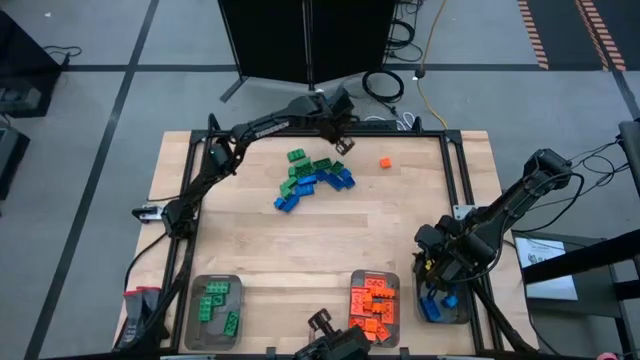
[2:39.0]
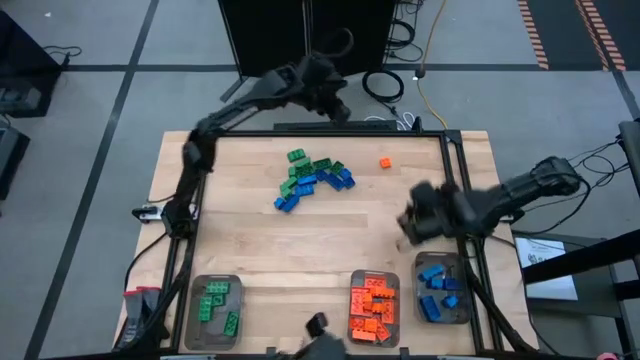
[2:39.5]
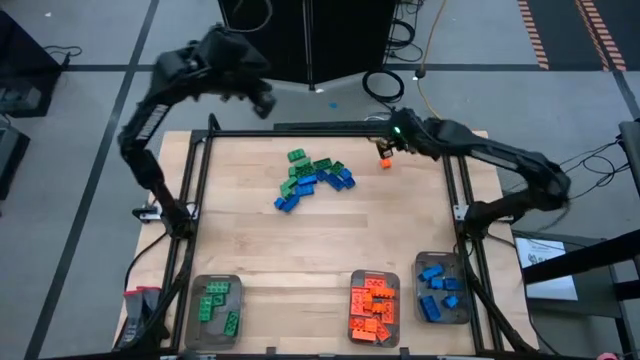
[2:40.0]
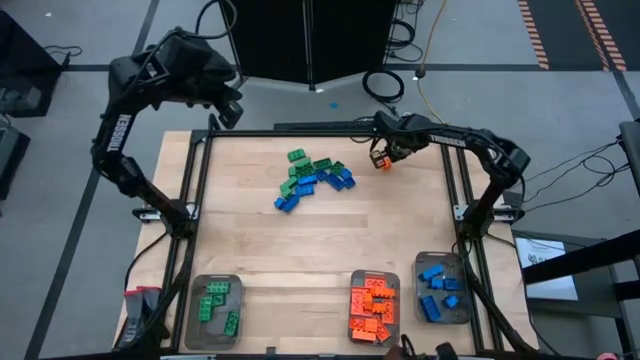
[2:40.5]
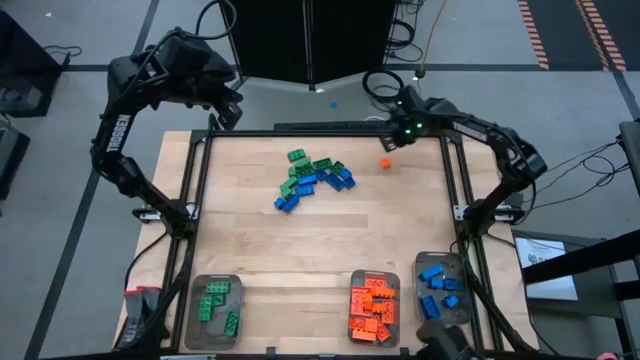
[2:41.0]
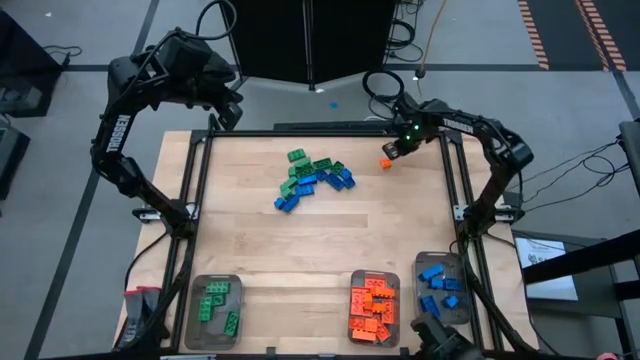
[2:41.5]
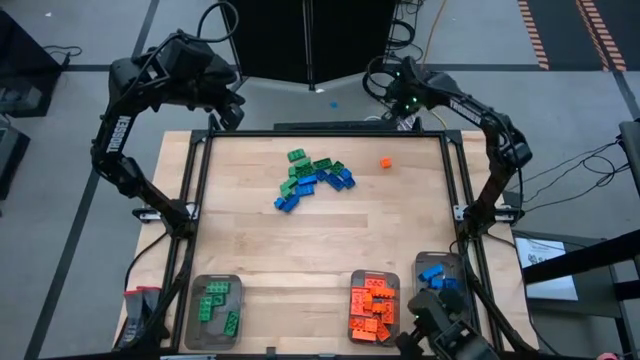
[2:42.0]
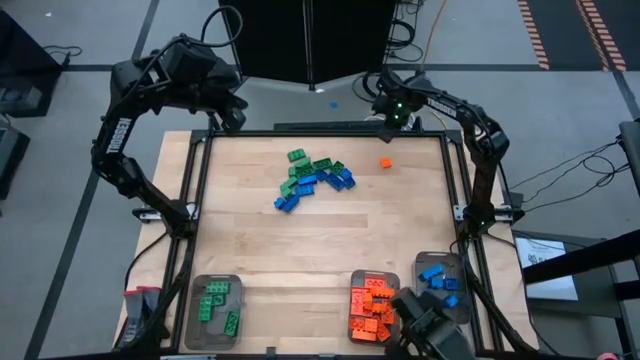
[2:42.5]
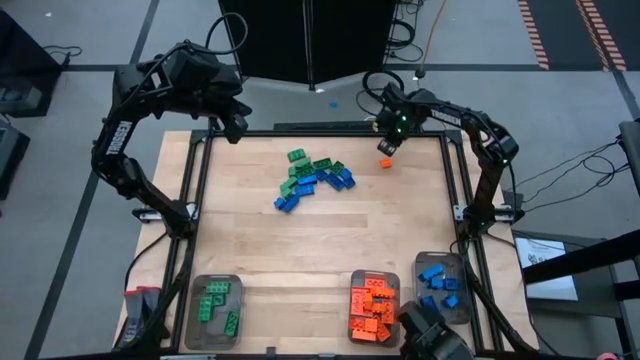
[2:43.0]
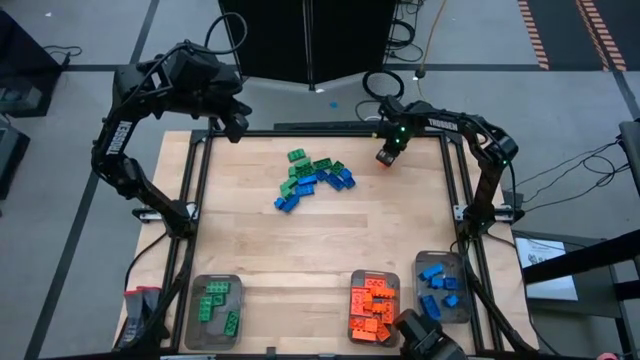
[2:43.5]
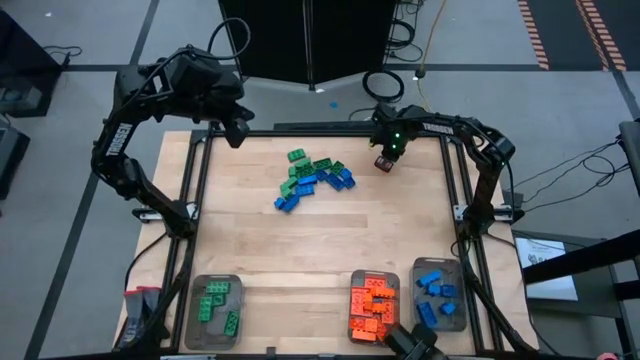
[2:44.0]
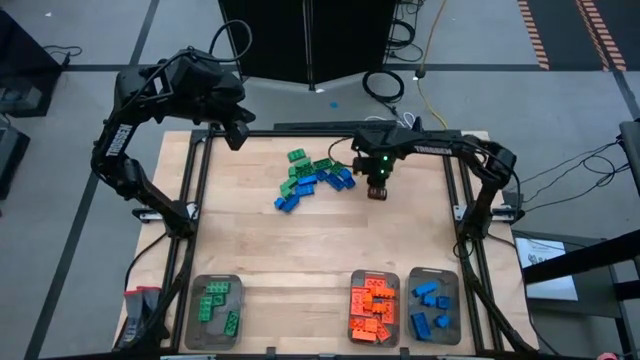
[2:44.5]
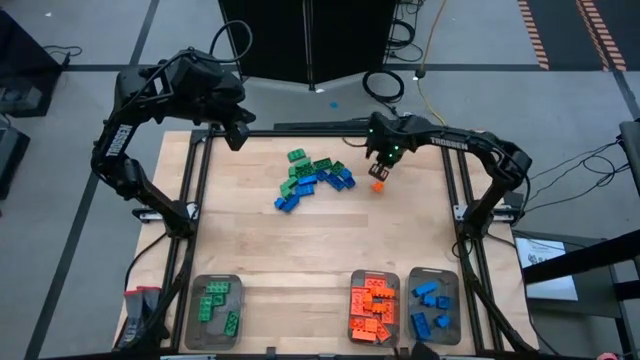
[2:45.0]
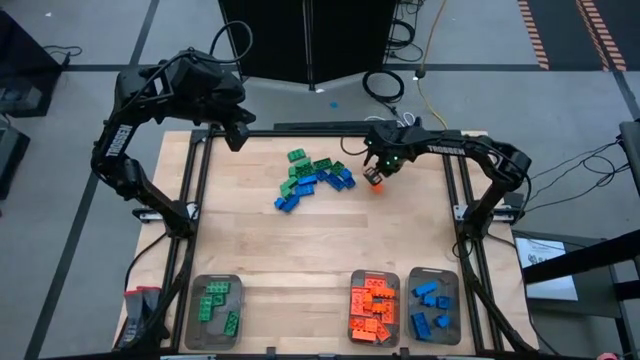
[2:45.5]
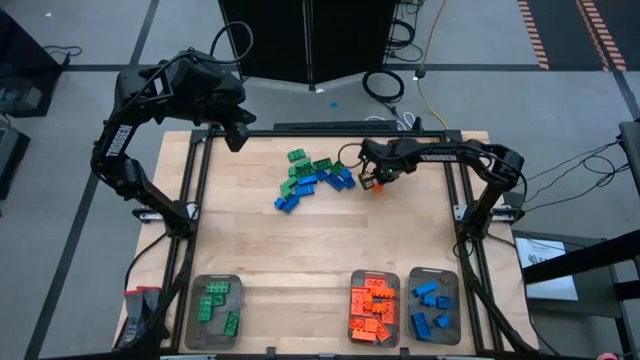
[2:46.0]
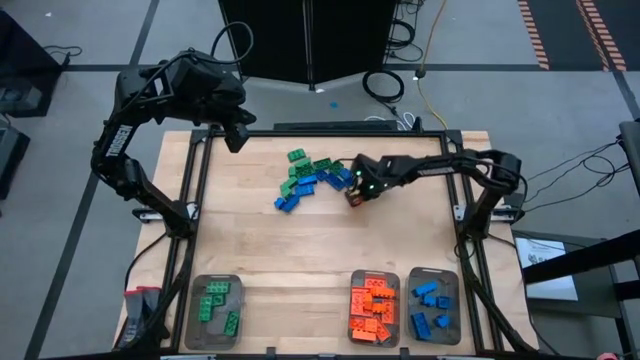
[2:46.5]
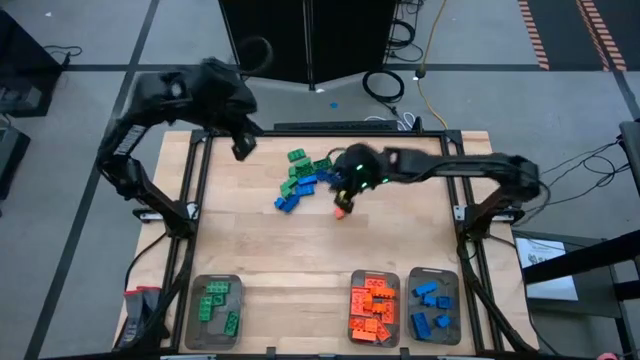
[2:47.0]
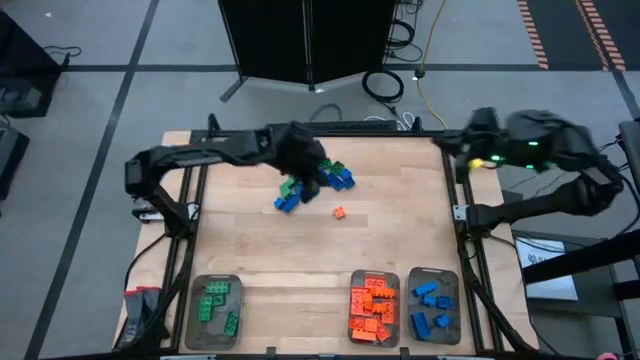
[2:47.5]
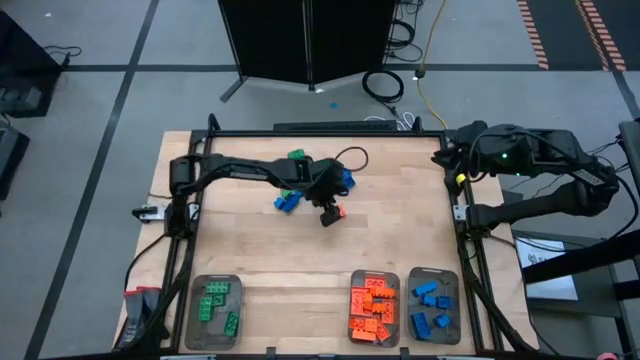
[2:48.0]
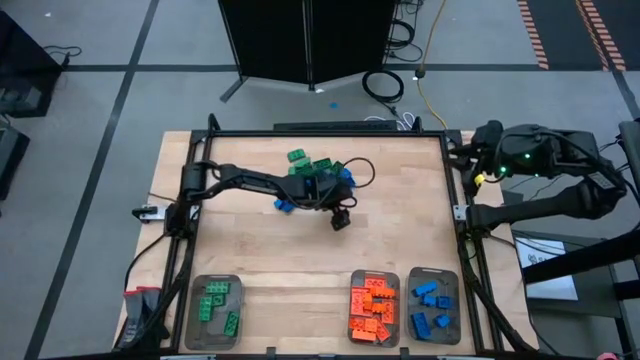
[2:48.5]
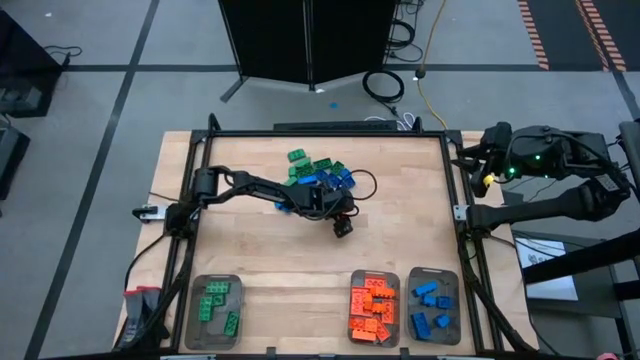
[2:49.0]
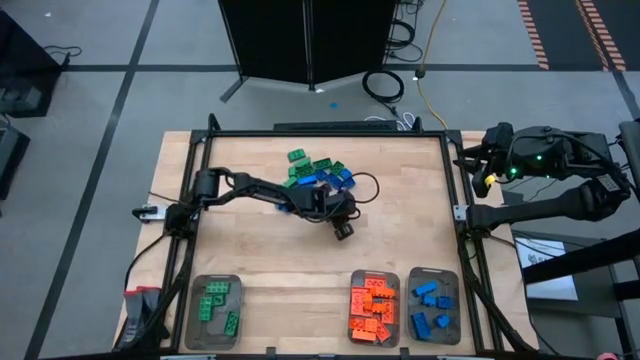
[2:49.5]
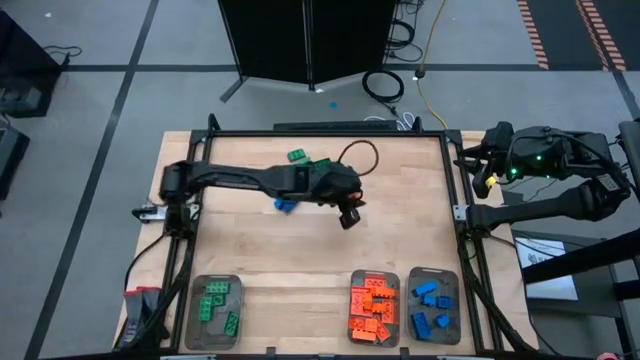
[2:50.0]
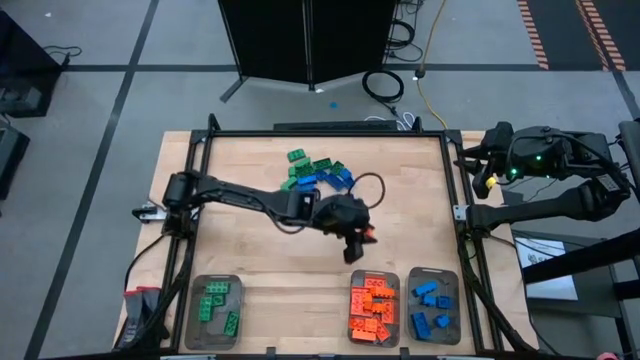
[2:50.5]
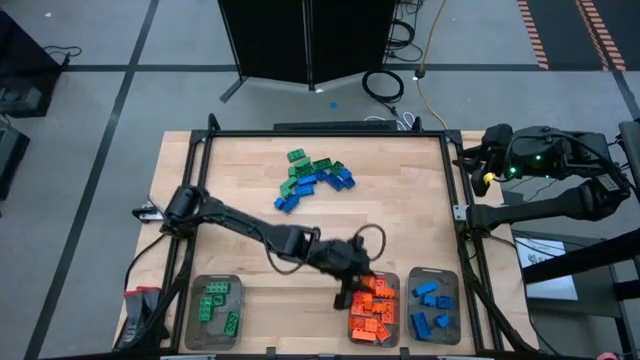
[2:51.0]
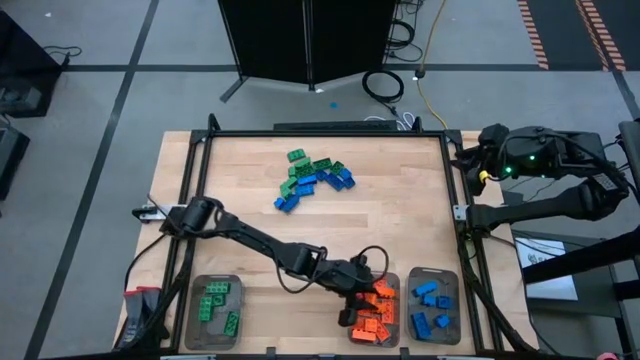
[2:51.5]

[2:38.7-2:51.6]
Task: Sort blocks
Put the orange game piece into the center black bin

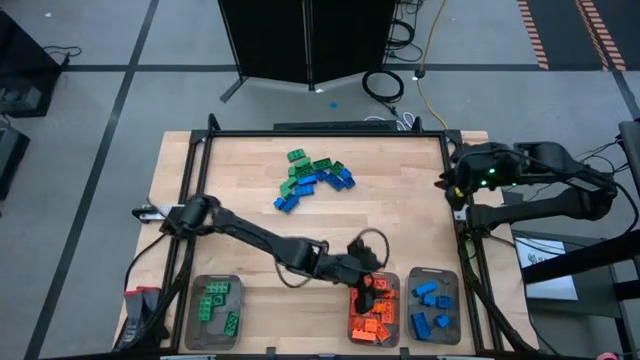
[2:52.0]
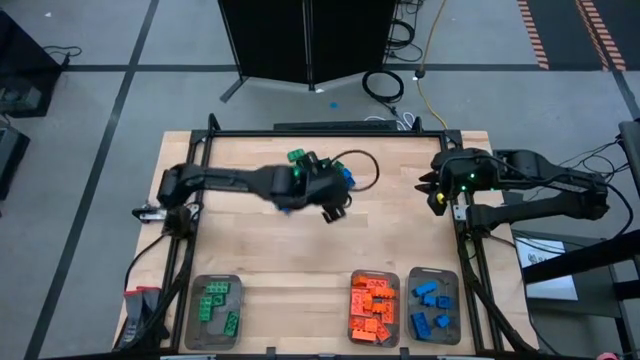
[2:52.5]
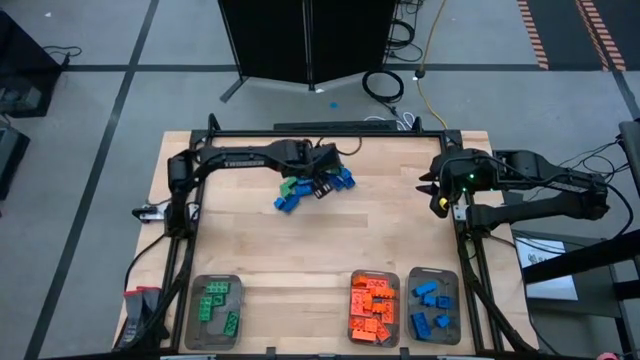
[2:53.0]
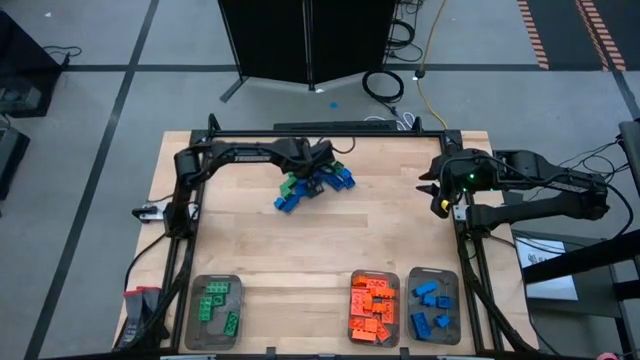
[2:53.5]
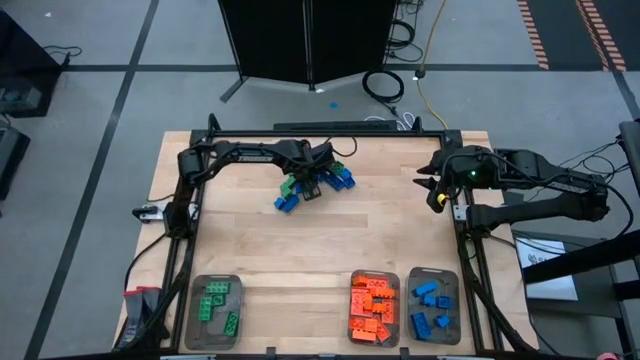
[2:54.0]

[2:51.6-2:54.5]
Put the blue game piece into the right black bin

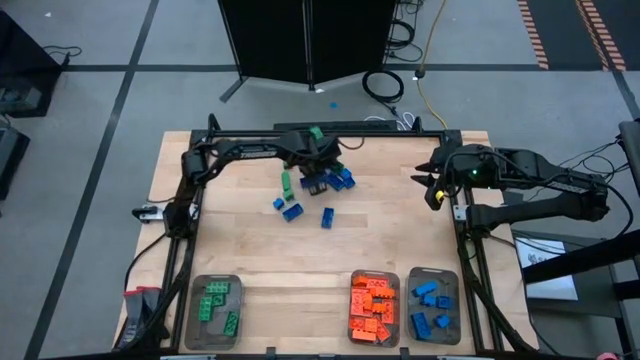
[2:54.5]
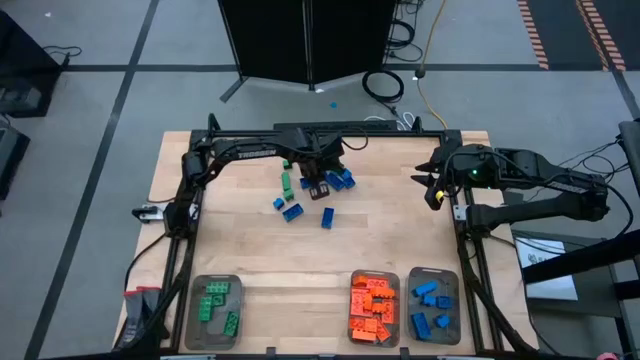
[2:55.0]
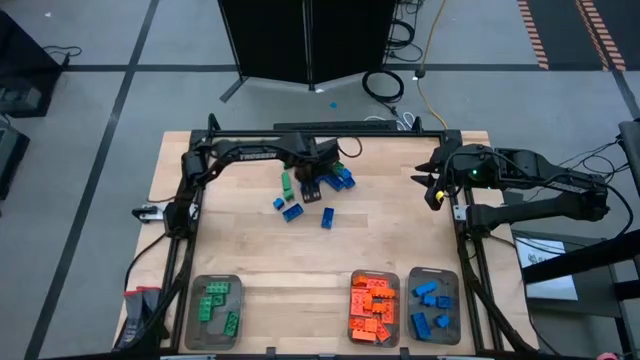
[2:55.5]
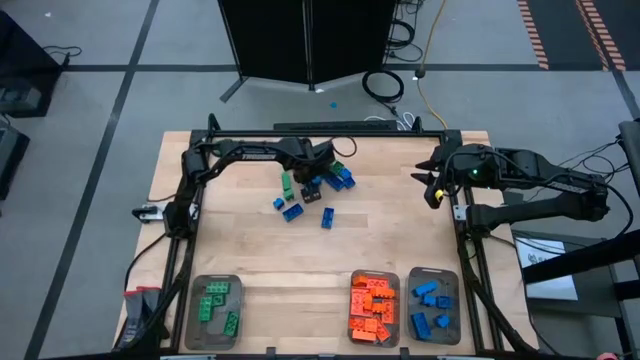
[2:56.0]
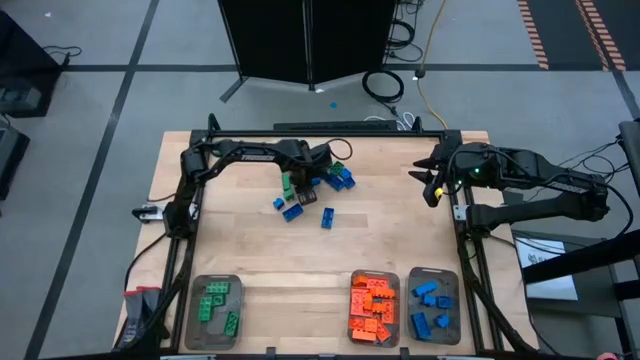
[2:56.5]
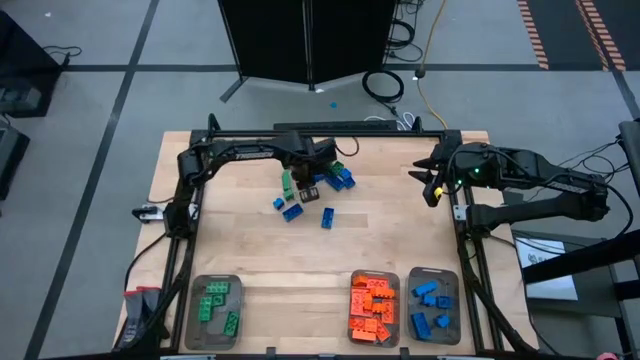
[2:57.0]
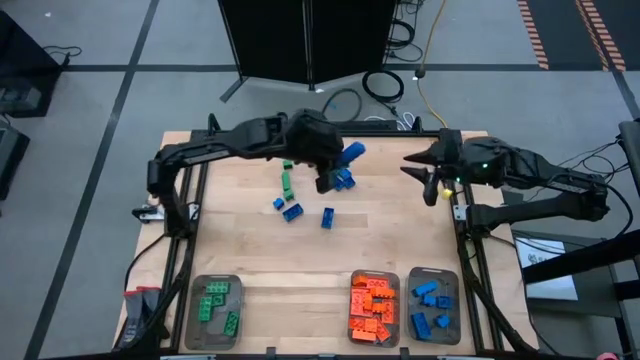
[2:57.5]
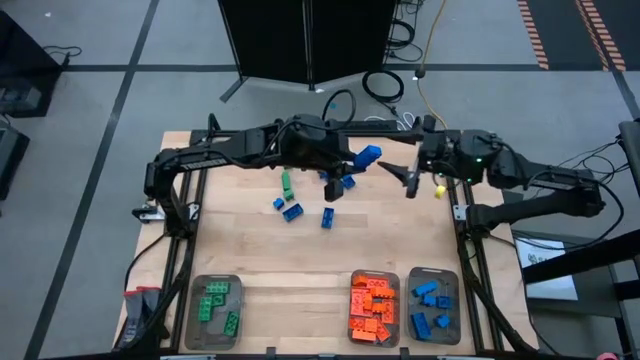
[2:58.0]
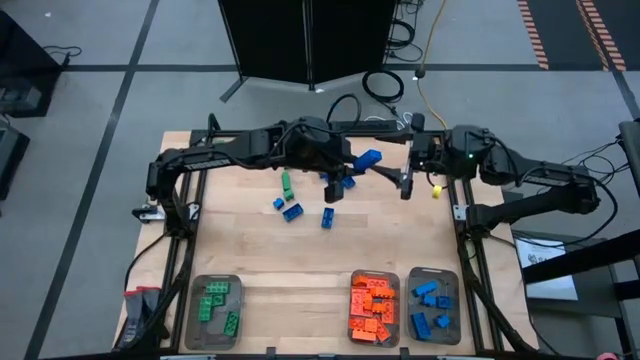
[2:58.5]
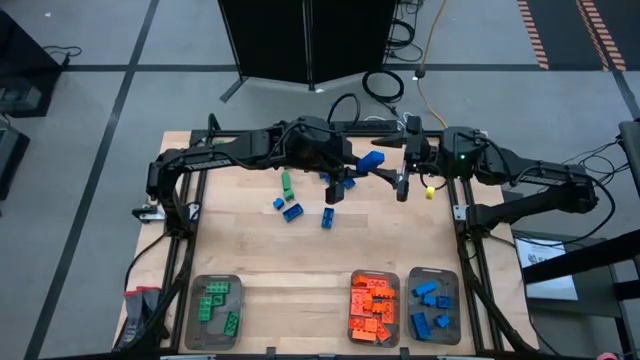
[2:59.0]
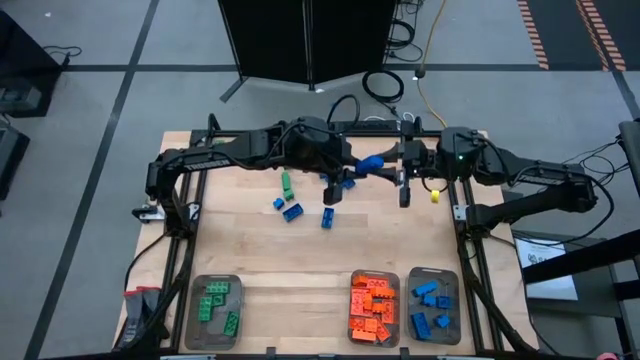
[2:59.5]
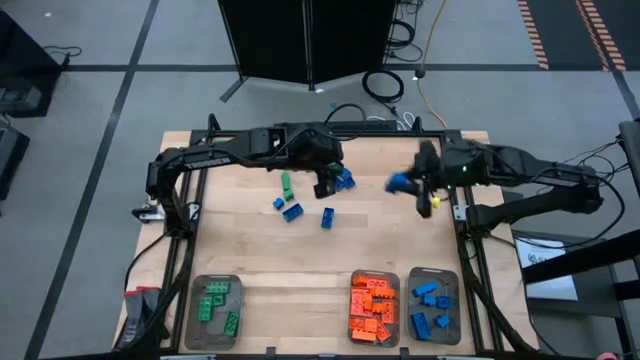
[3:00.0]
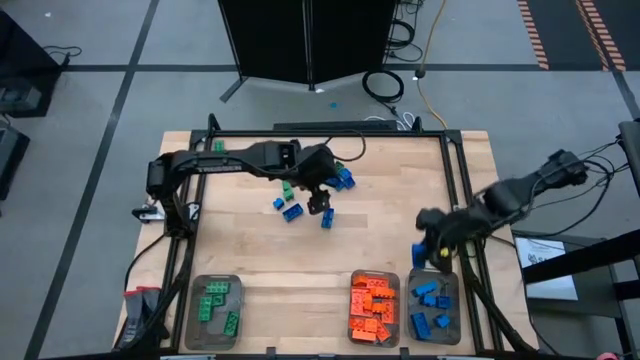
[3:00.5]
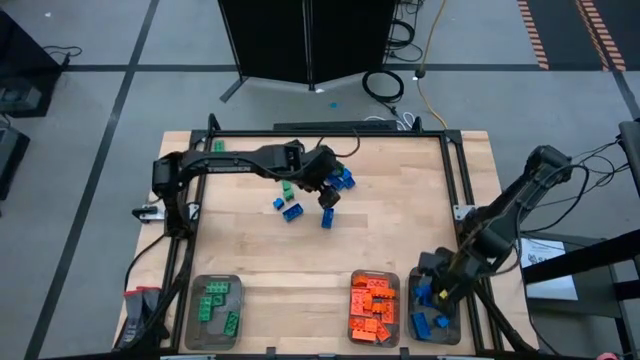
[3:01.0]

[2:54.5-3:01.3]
Put the blue game piece into the right black bin
